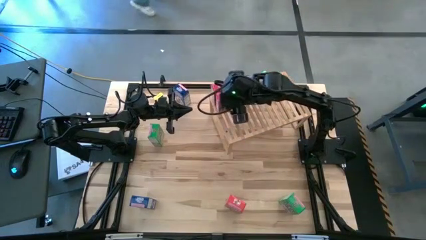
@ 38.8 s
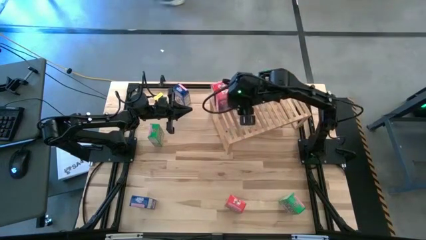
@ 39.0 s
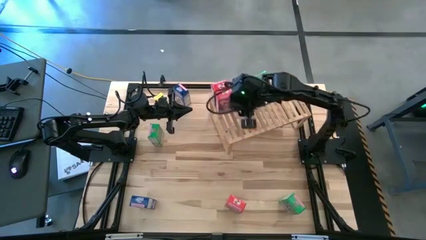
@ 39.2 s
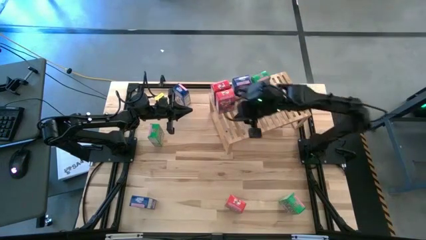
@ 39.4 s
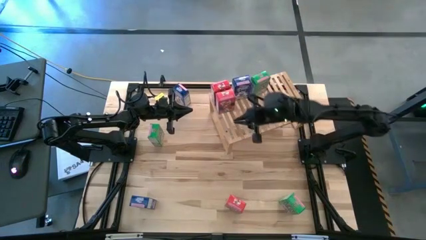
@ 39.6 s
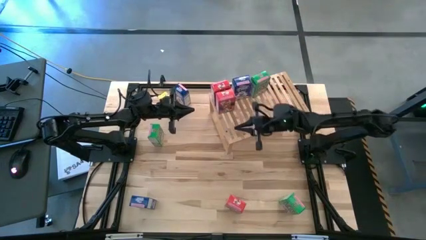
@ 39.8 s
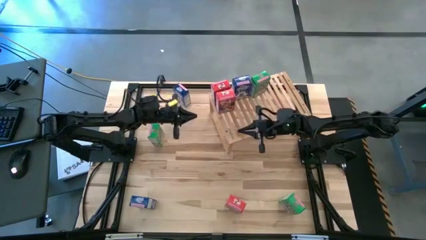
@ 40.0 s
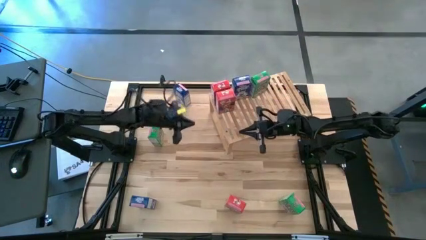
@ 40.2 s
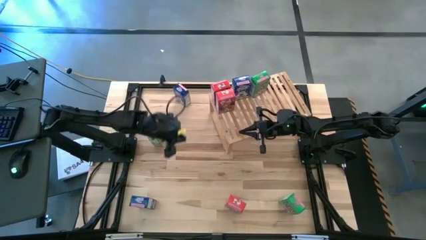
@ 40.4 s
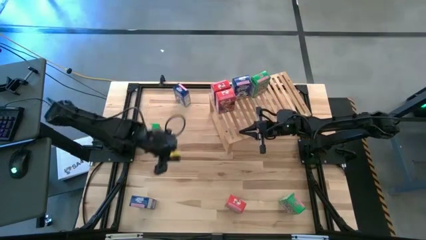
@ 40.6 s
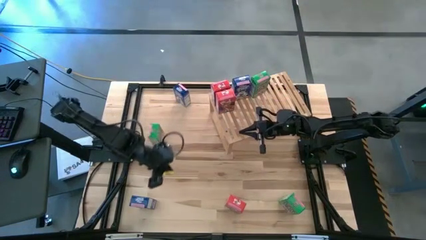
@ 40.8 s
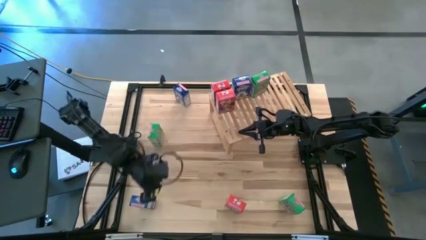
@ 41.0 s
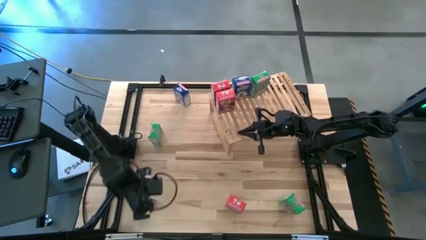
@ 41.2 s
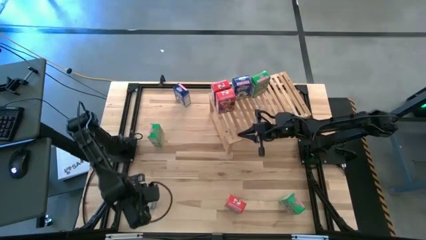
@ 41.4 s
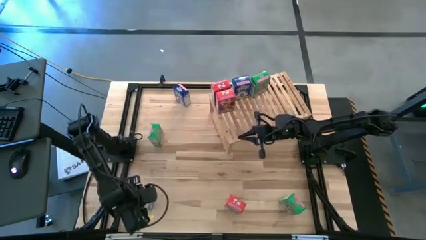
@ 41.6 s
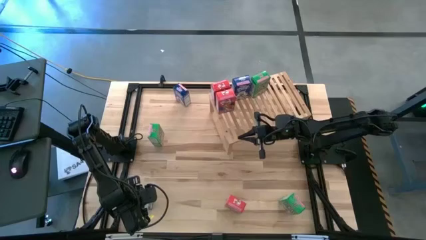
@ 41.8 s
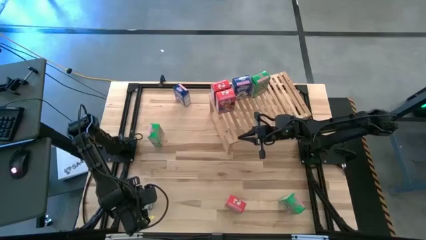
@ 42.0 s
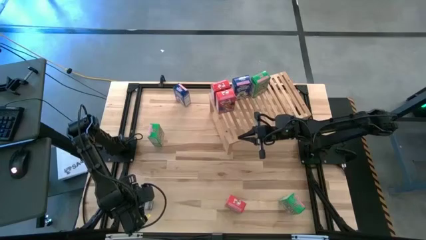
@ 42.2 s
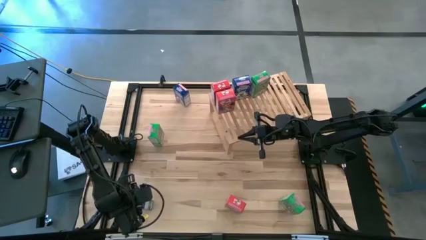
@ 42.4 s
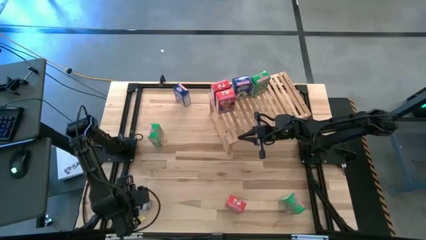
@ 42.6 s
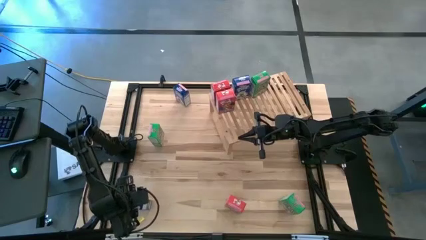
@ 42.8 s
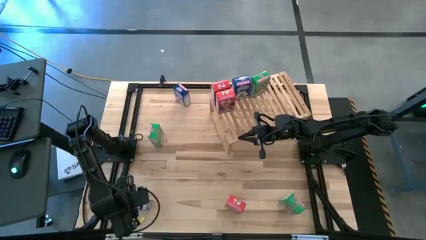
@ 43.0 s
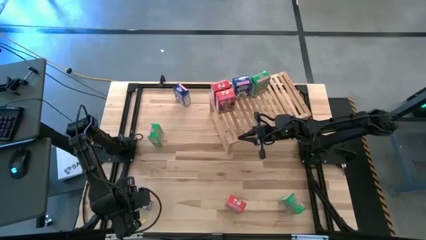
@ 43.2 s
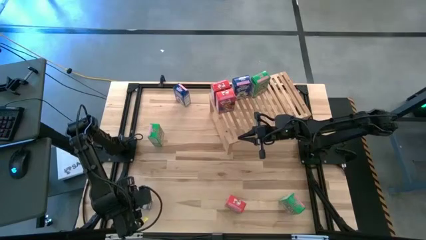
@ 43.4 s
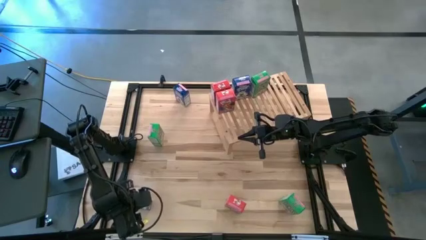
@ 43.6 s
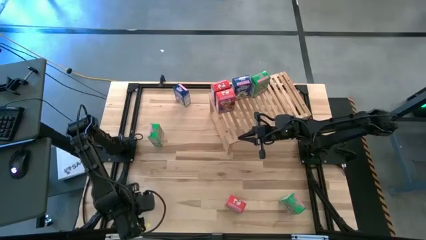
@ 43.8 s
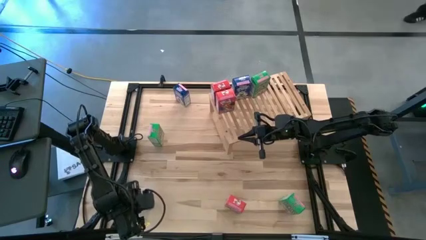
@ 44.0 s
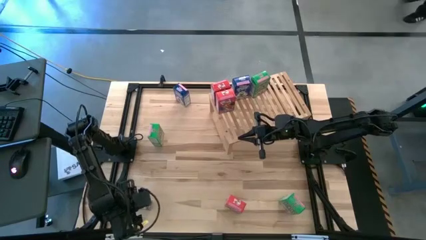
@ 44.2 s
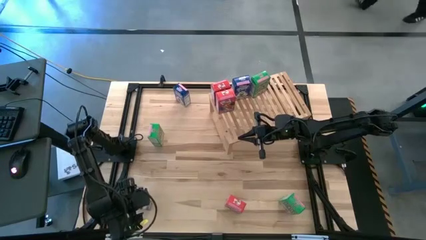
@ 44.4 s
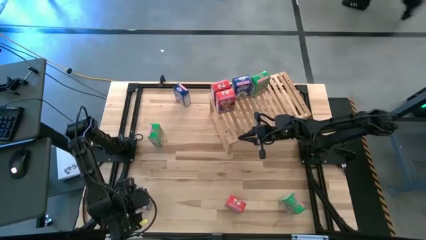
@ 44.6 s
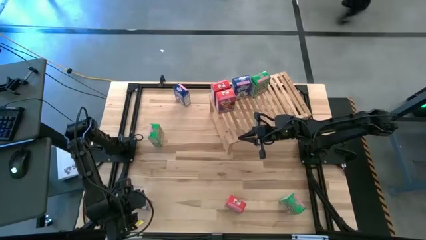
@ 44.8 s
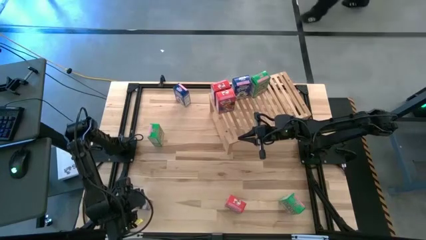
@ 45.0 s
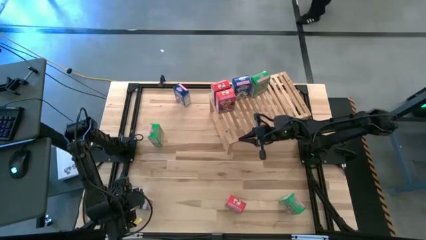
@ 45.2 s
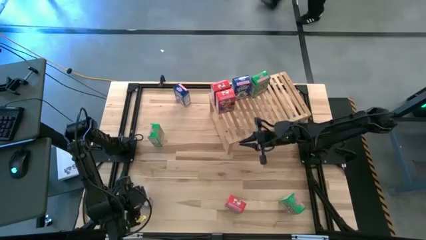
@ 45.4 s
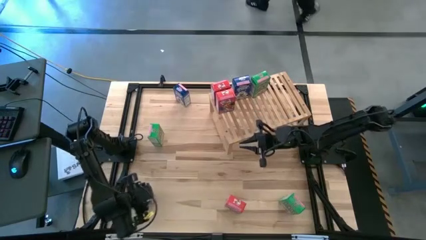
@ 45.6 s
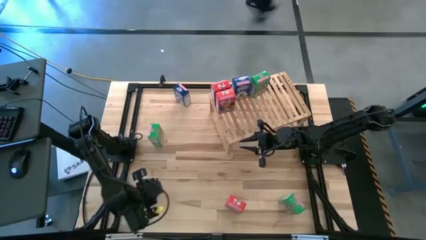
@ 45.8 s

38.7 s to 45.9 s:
Task: Stack cereal on shelf
Put the bottom blue cereal box on the shelf aligned with the other blue cereal box

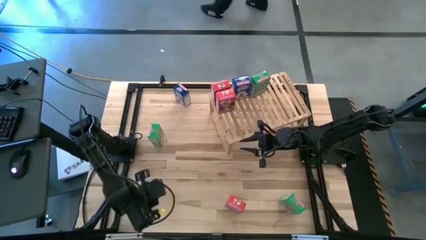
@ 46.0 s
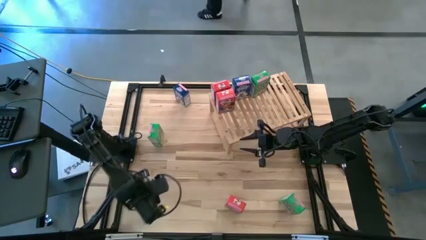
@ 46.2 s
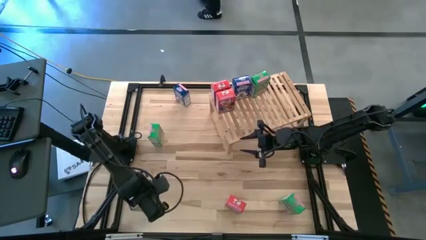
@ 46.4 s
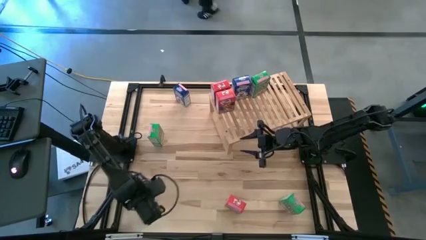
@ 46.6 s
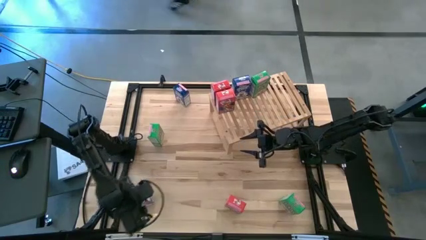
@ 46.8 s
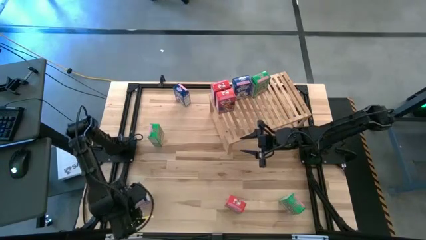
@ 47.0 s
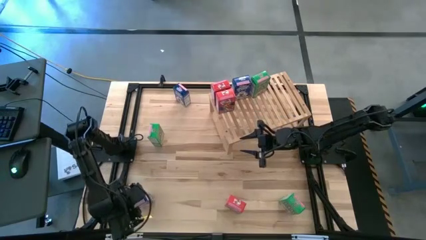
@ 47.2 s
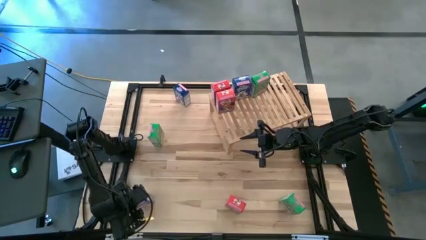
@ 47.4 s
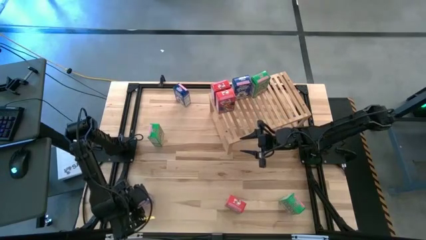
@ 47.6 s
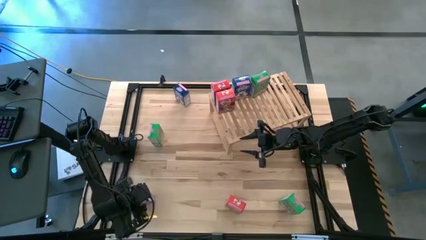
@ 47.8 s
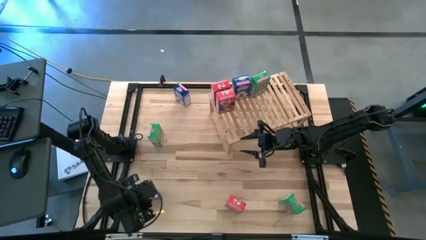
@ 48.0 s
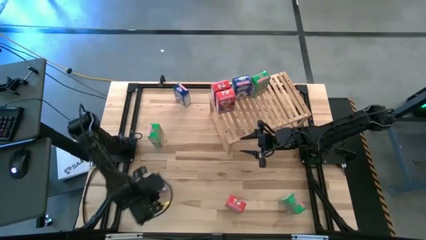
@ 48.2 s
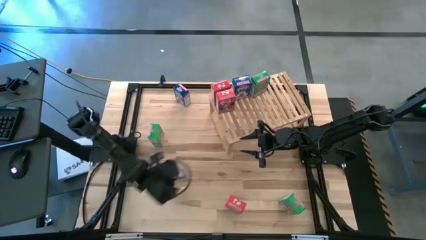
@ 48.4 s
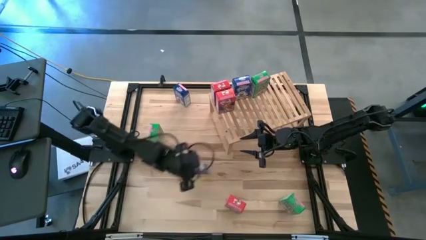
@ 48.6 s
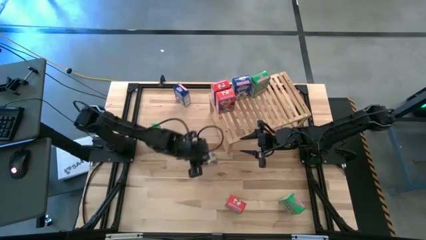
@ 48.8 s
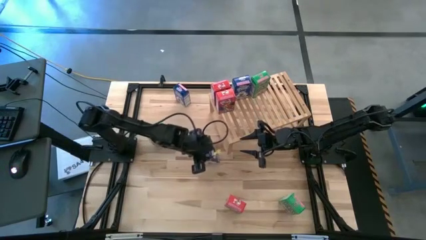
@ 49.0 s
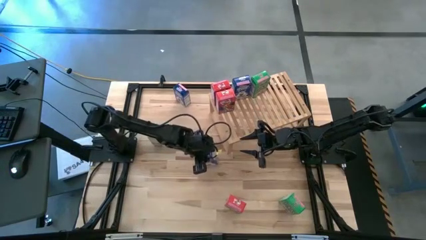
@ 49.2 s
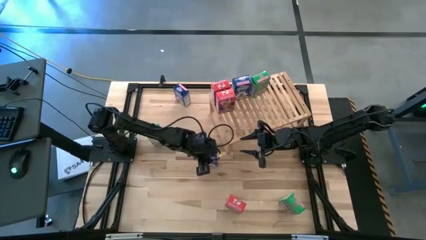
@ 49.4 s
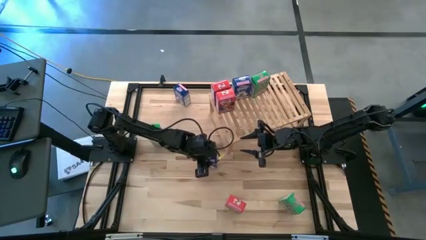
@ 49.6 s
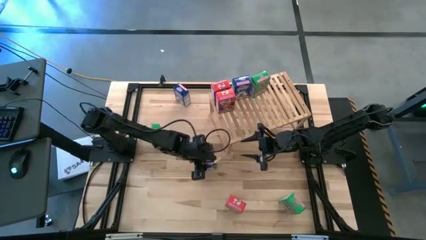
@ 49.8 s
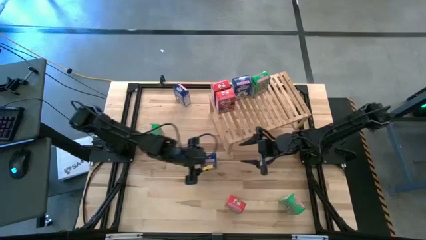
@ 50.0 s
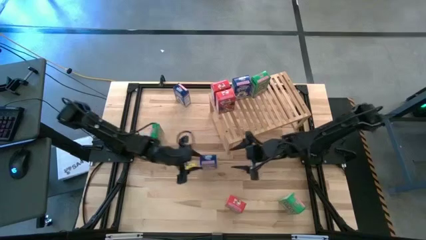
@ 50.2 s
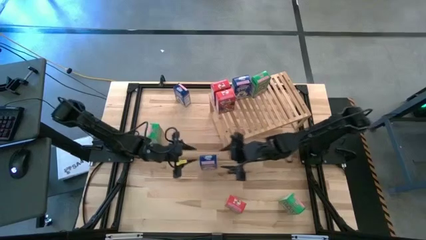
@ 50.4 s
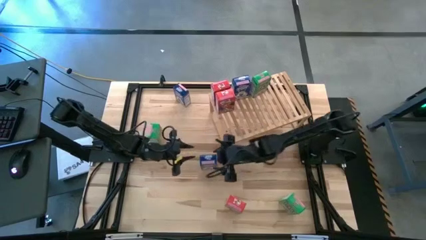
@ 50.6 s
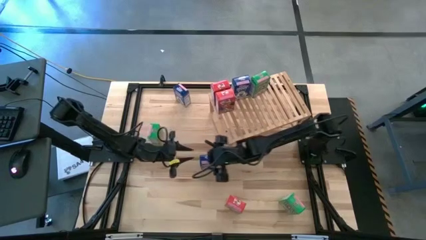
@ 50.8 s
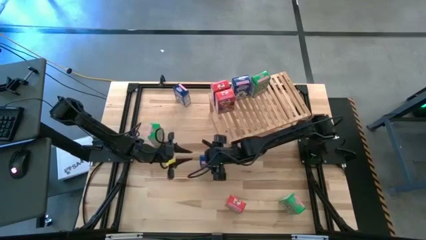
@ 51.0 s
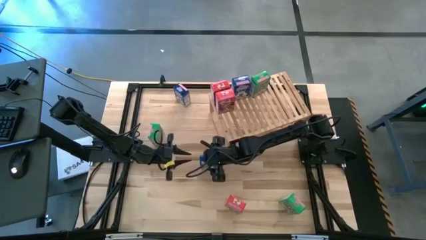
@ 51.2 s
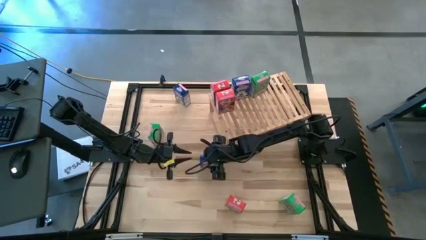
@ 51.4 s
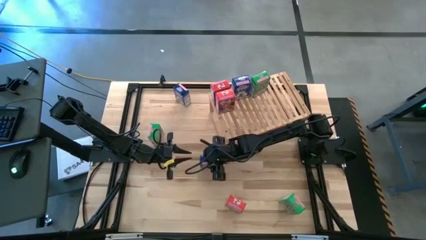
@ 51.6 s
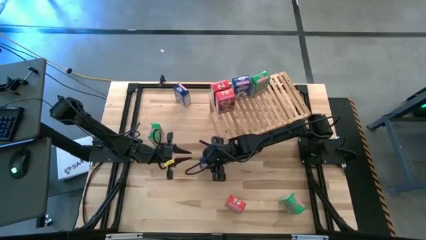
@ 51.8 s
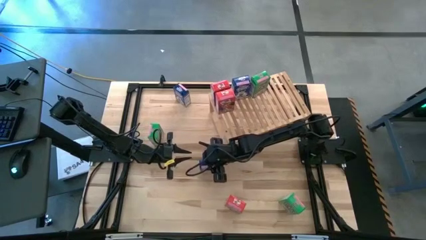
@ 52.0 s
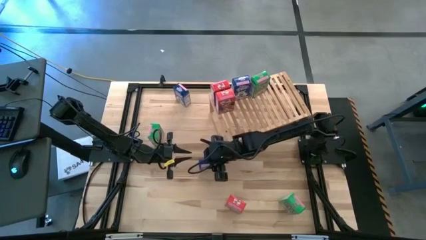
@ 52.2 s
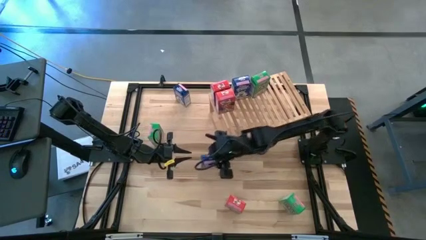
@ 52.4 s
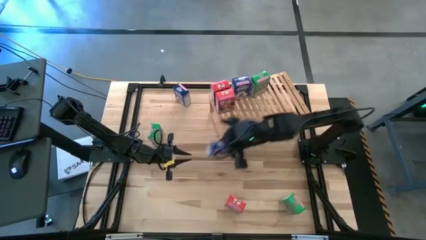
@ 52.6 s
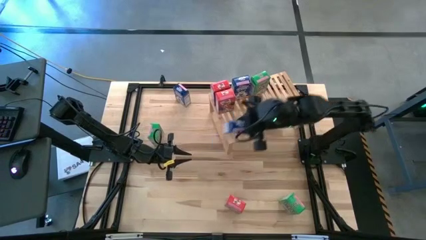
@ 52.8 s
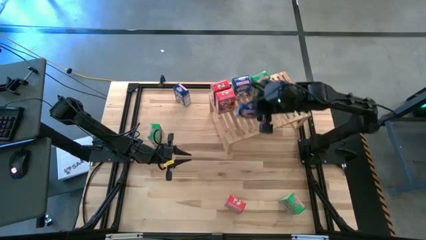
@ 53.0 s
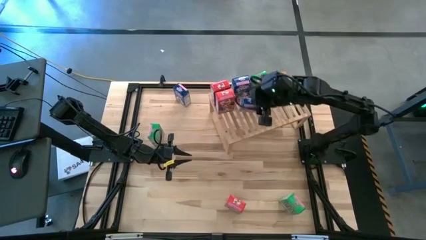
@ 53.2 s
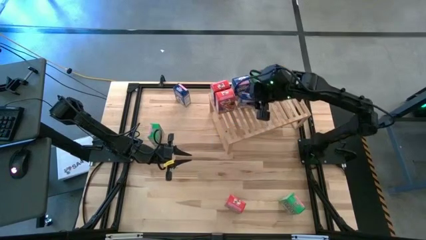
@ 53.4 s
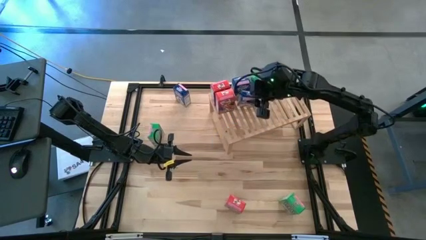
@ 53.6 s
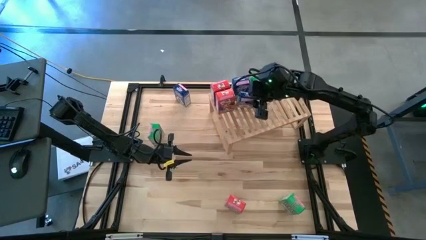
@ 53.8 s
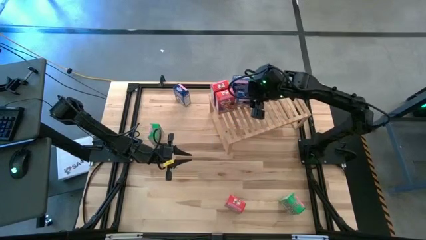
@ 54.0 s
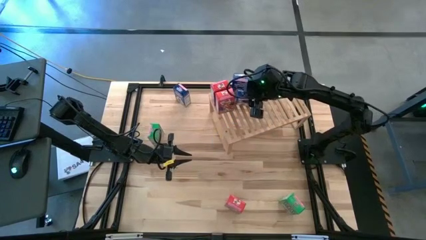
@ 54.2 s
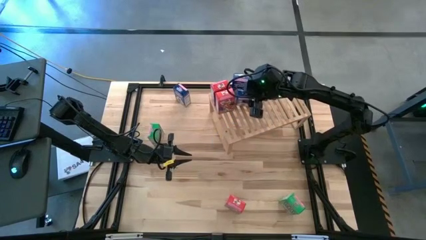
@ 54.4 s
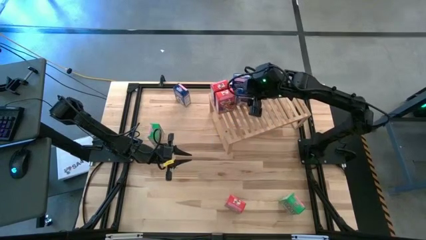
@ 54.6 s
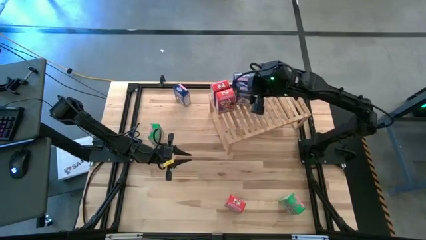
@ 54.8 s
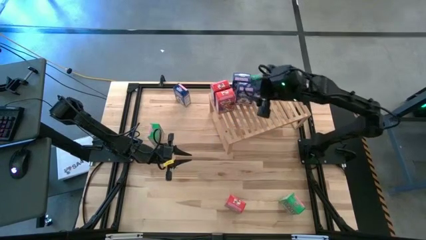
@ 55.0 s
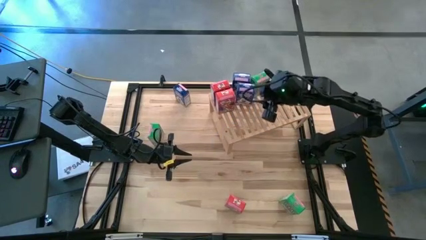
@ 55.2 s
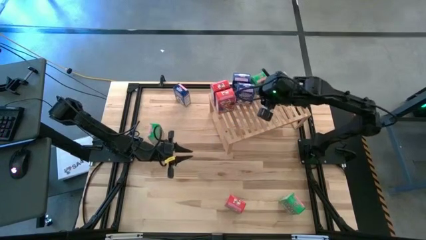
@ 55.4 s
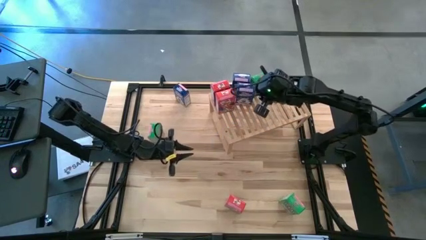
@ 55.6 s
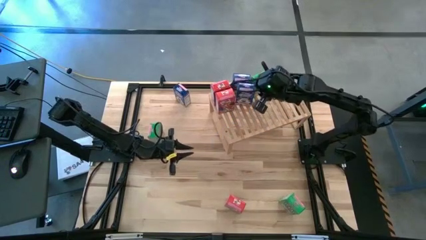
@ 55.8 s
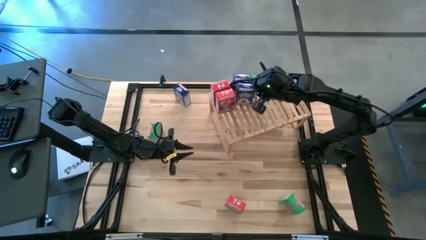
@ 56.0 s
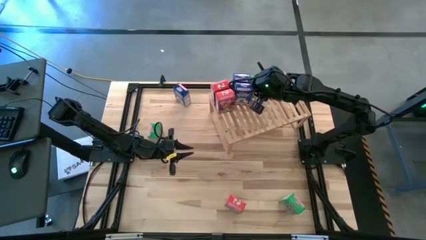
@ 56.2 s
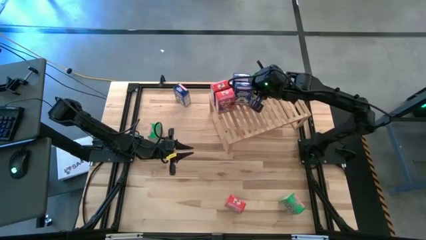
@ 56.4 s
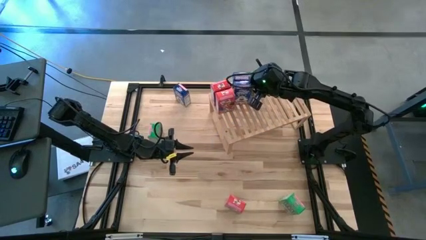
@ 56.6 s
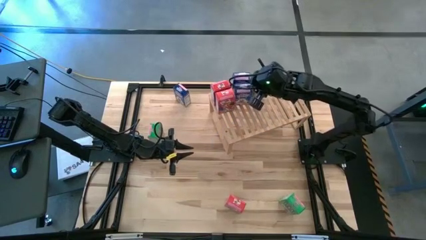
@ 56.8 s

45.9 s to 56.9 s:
Put the bottom blue cereal box on the shelf aligned with the other blue cereal box
